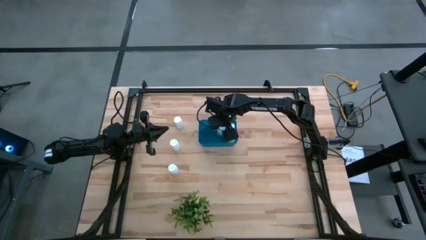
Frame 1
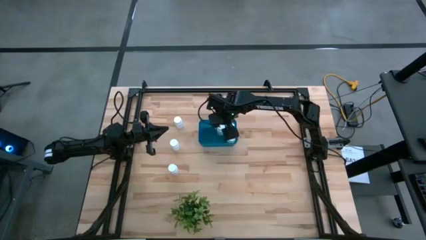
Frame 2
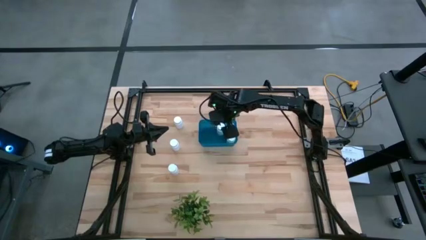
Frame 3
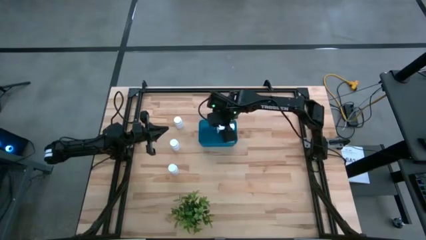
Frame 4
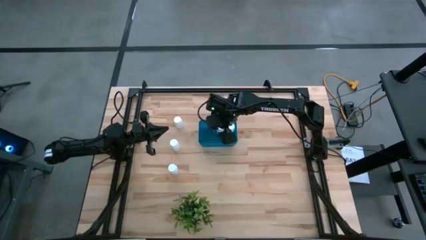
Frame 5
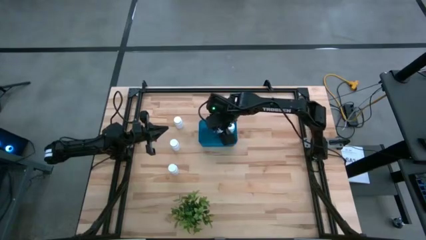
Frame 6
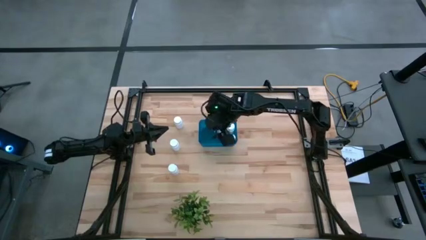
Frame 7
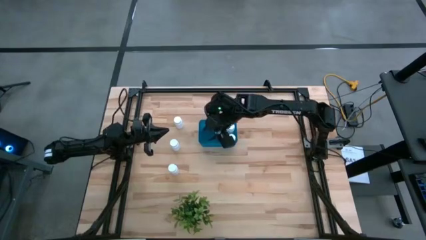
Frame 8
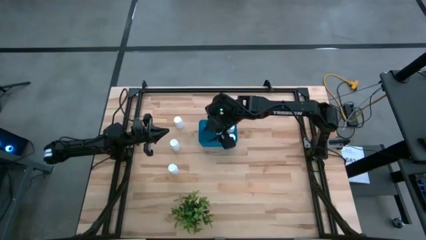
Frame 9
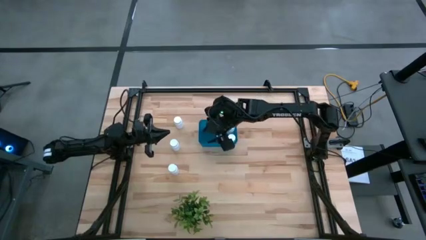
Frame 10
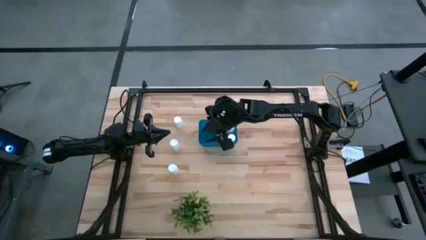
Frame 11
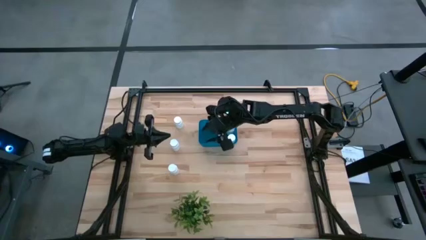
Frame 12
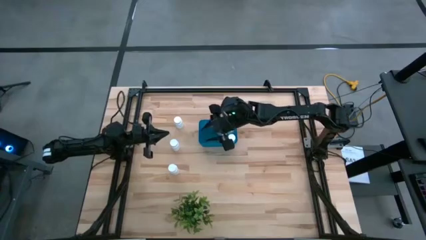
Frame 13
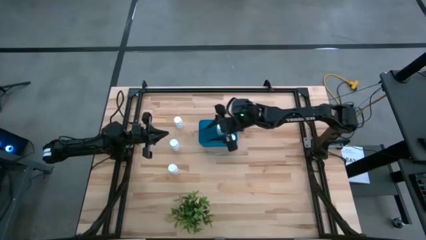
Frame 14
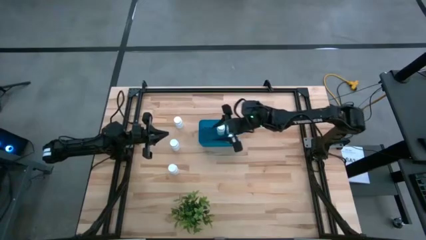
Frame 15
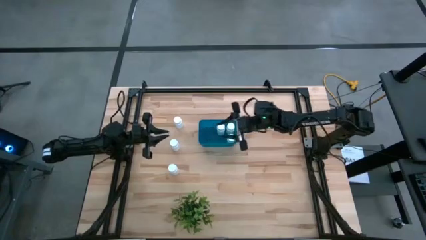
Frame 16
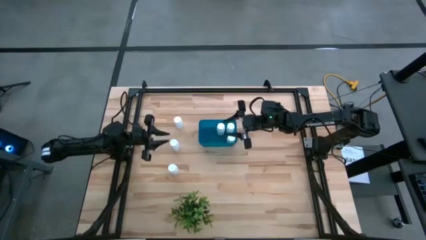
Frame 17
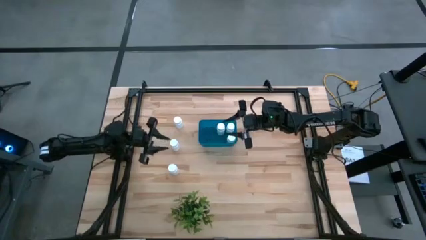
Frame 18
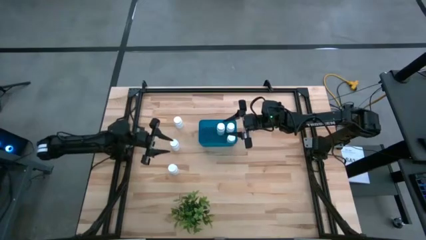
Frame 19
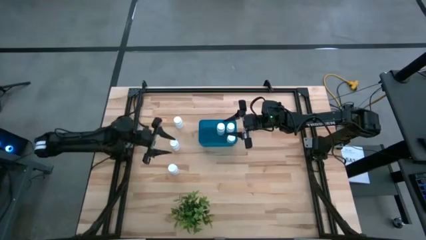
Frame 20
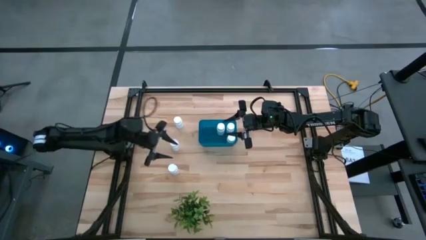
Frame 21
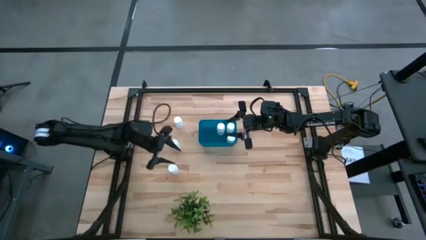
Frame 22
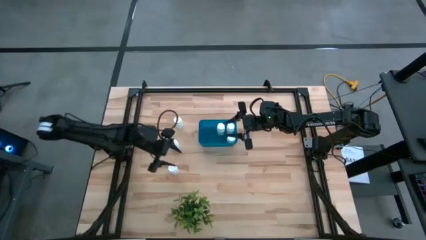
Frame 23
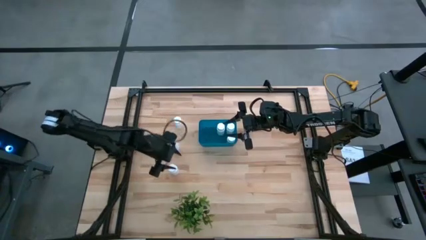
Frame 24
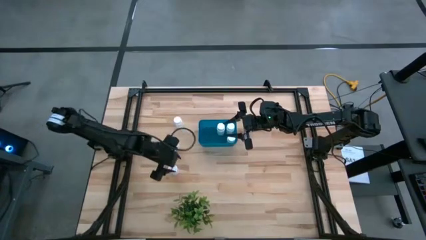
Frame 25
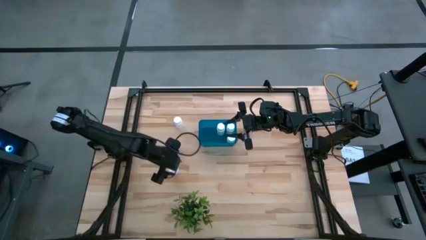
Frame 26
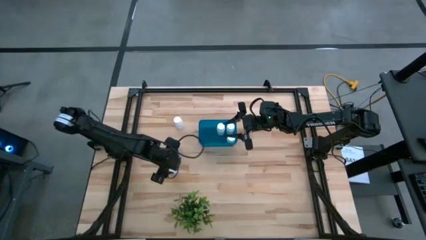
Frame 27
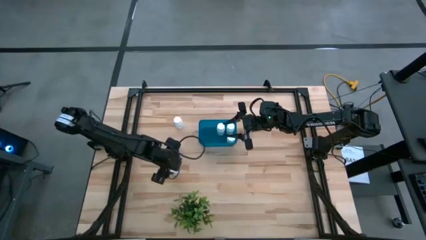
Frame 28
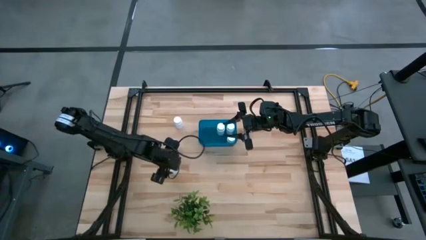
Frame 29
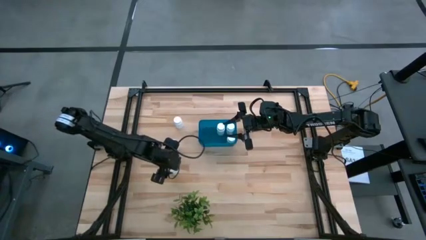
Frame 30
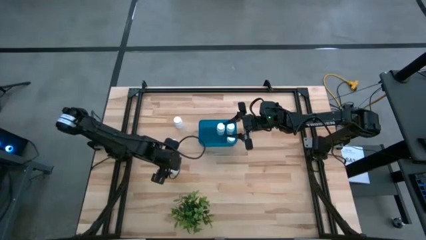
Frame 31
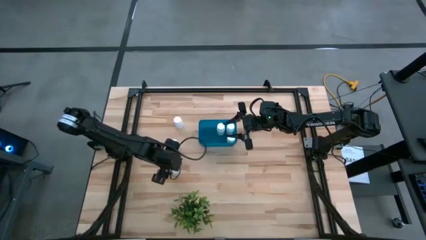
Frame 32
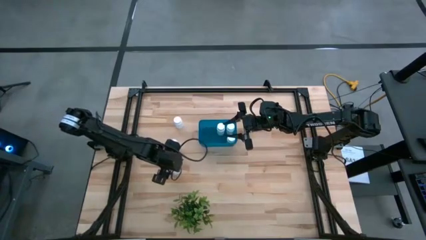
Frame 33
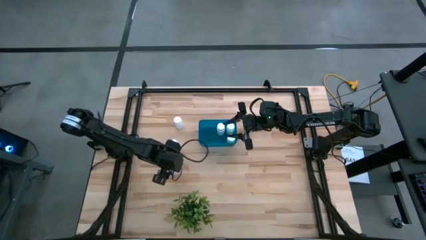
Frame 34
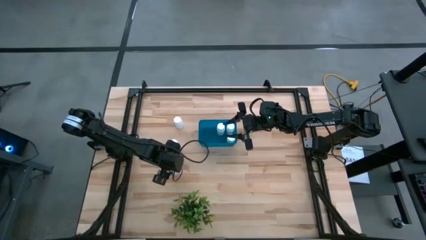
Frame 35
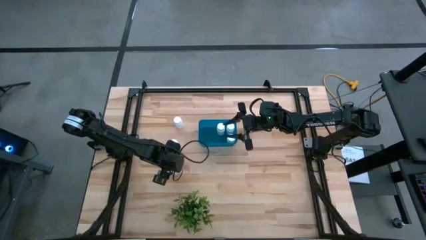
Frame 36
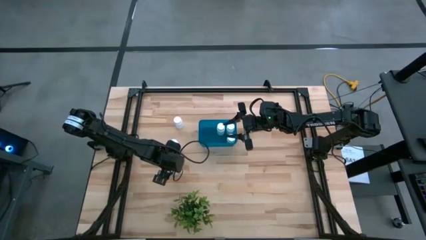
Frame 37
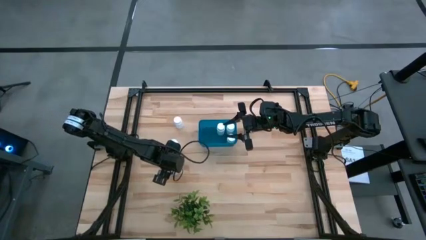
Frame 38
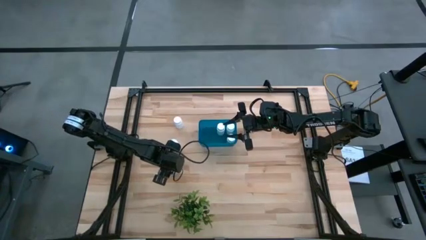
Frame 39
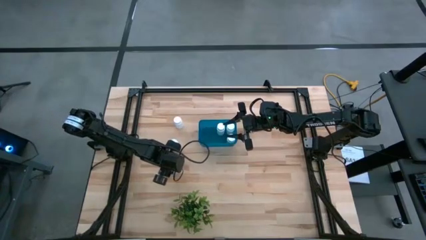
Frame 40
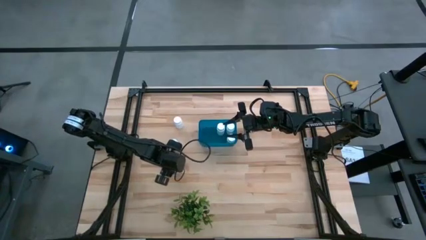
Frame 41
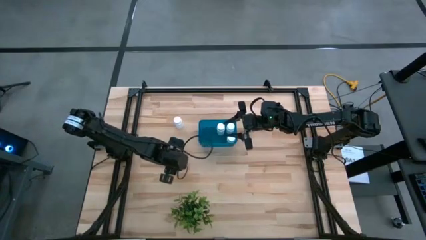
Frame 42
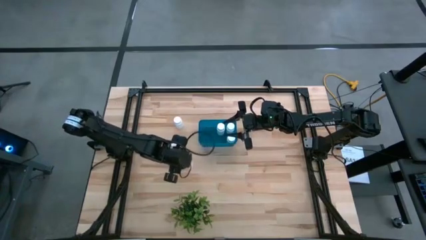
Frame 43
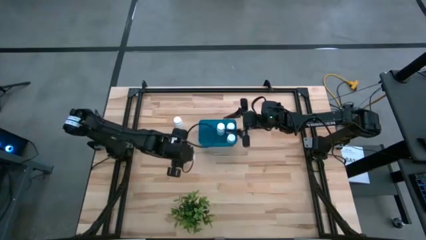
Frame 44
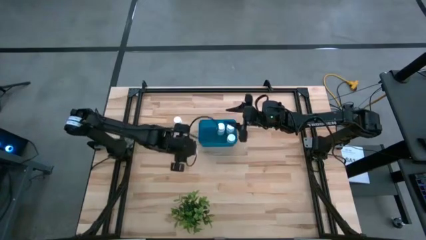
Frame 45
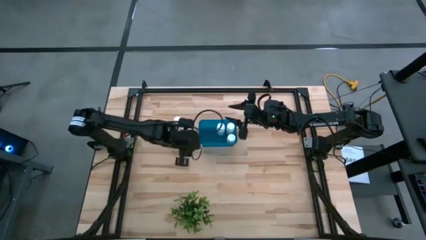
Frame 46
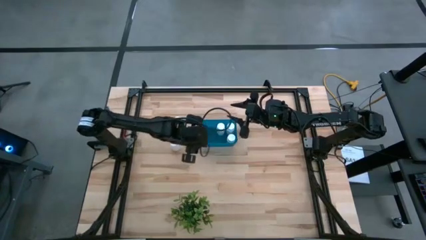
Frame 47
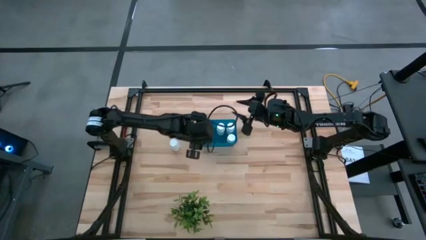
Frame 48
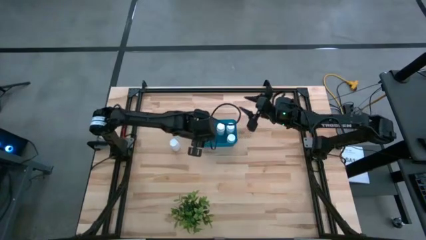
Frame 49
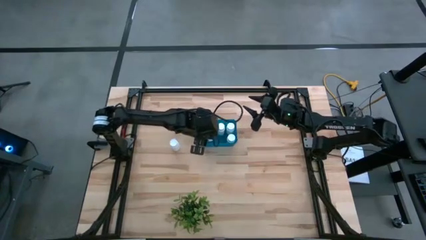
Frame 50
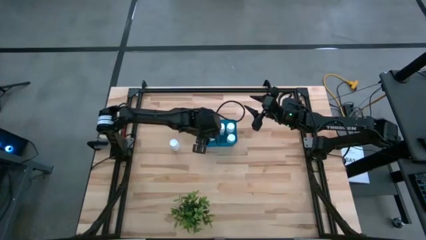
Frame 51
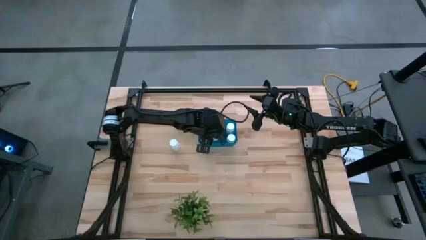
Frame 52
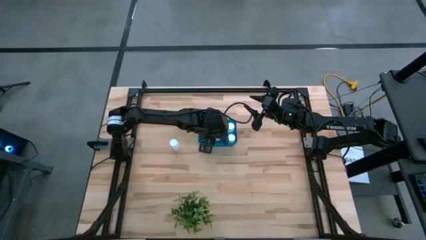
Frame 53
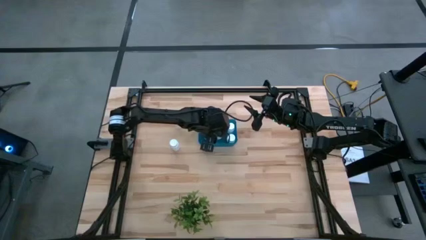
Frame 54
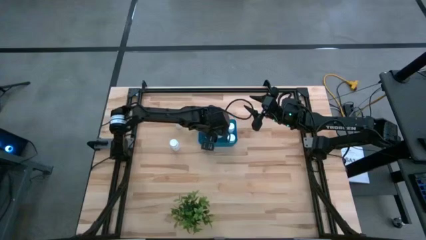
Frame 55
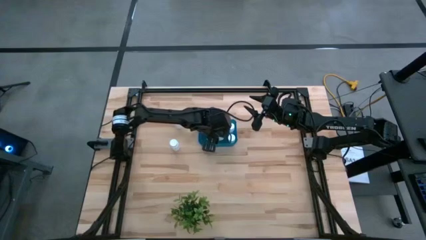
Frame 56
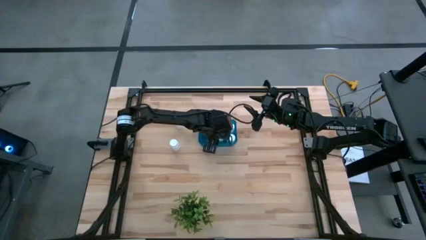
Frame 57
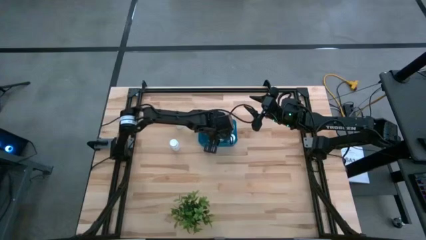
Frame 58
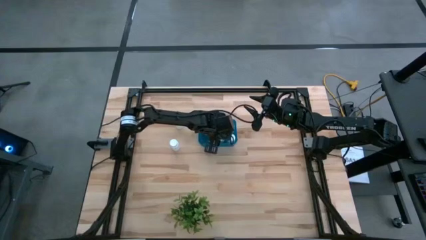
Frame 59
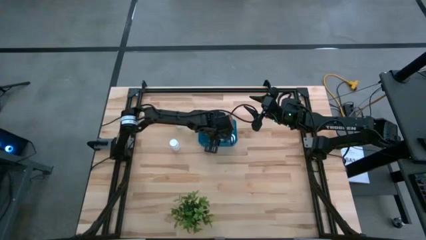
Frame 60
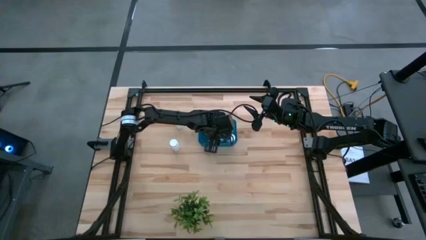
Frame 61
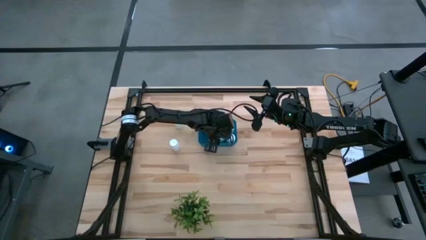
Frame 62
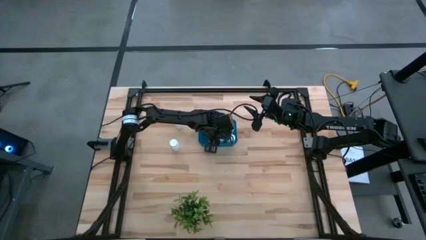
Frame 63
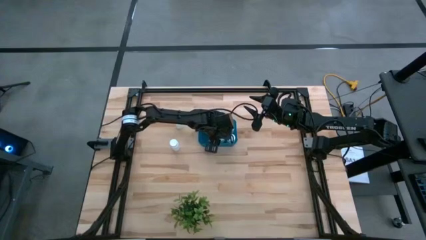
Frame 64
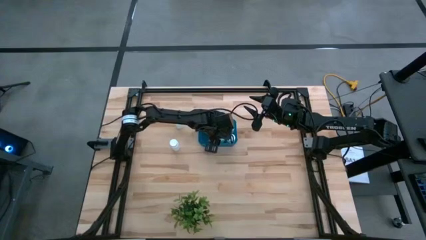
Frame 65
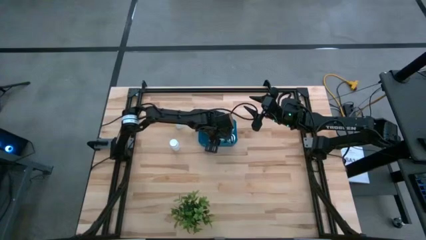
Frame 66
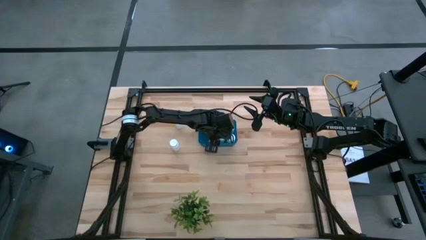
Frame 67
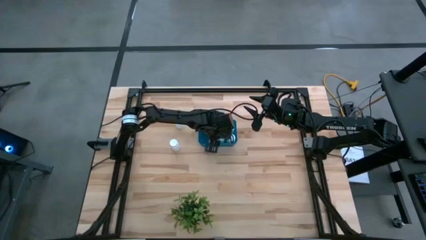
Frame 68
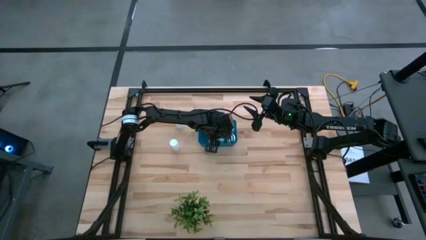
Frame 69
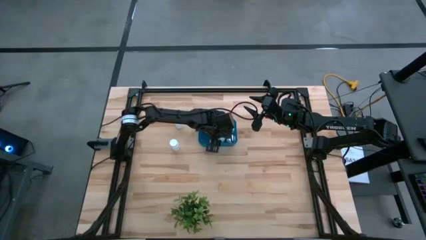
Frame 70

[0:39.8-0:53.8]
Task: Pick and place pill bottles into a basket
Put the white medicine bottle into the blue bin
